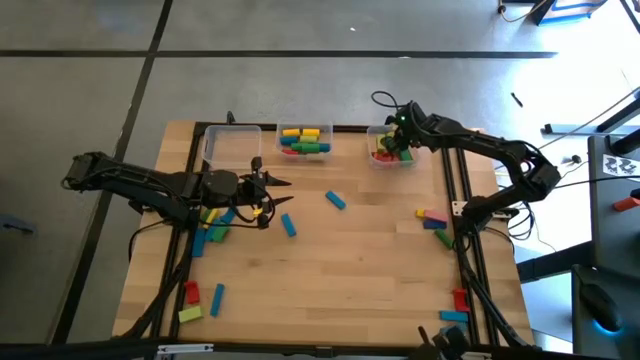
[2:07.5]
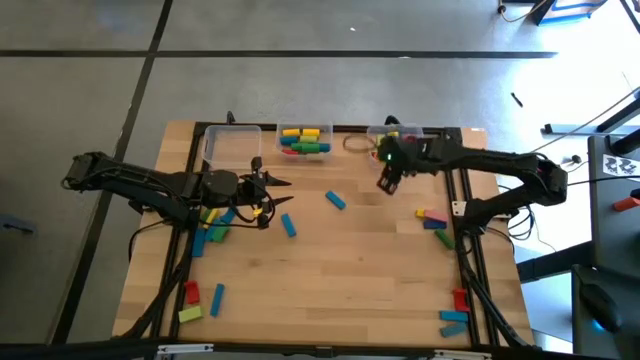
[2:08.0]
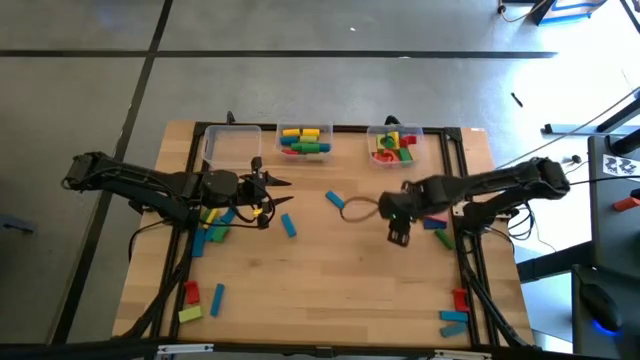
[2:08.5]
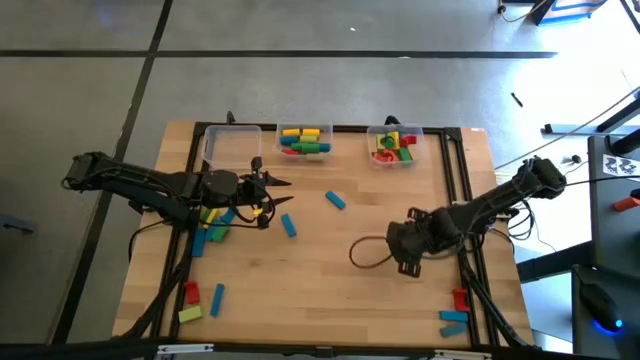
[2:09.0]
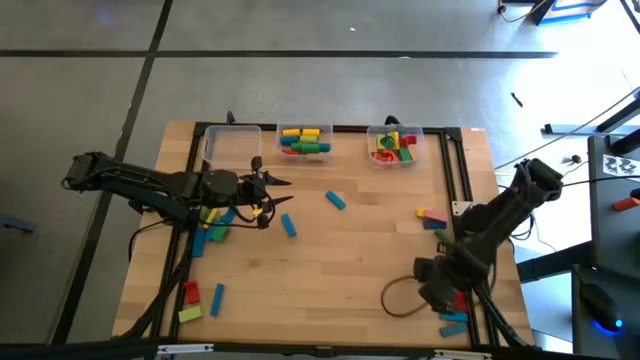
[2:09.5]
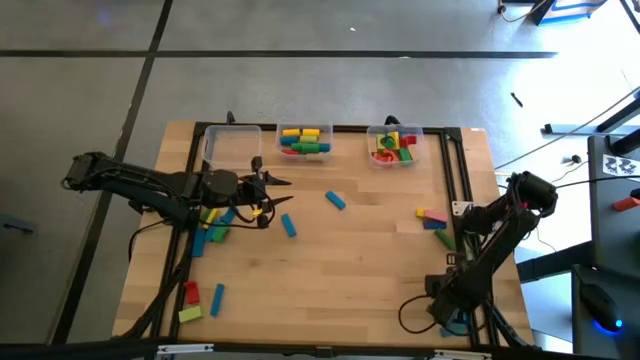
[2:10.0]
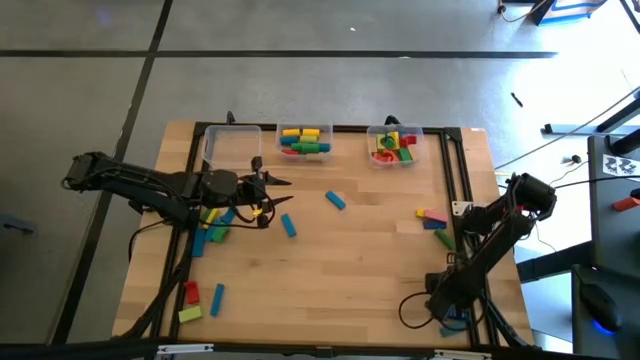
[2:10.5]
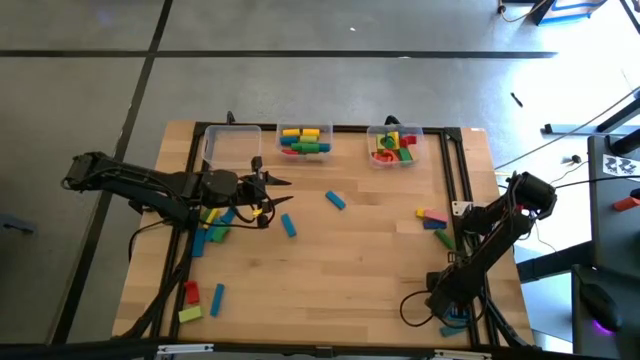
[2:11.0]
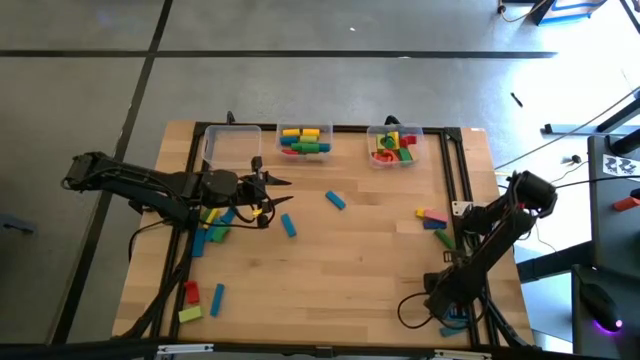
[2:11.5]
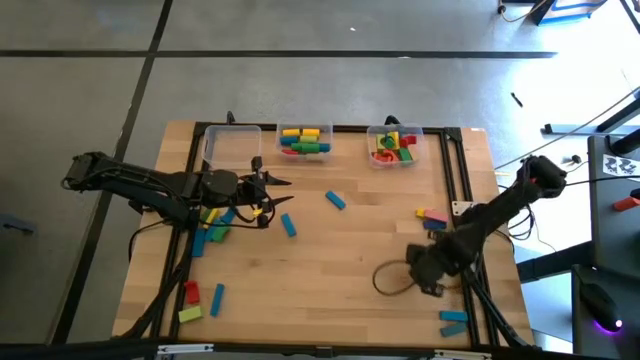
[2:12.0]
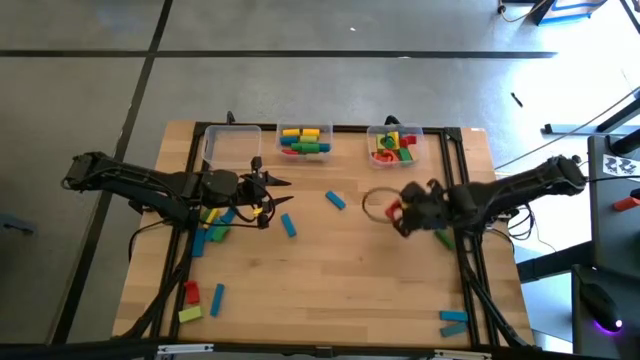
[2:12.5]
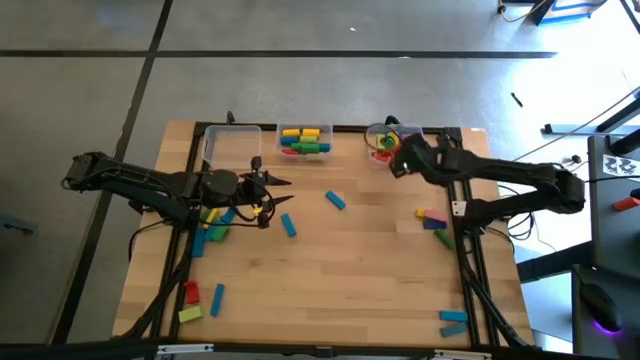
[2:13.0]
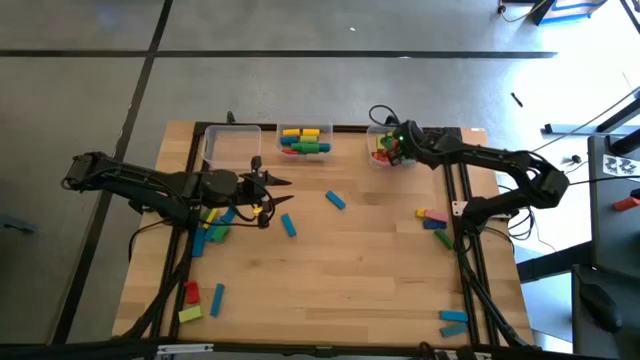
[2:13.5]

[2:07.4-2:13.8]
Task: Sort blocks by size
Put the red arch block into the right transparent bin

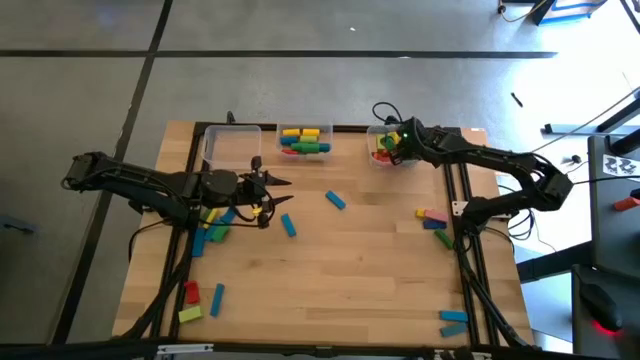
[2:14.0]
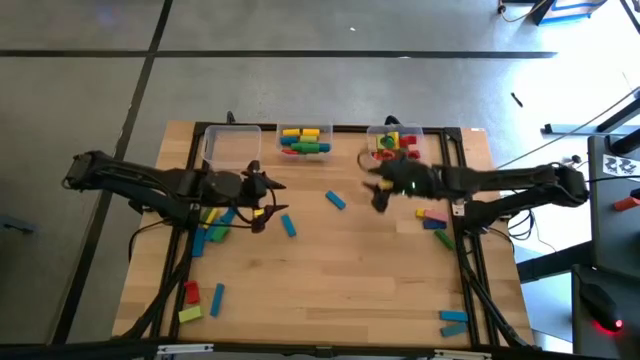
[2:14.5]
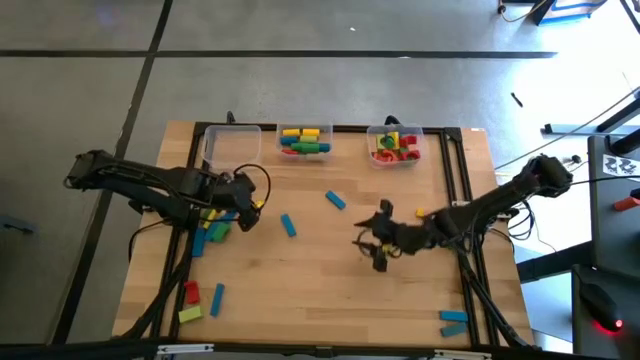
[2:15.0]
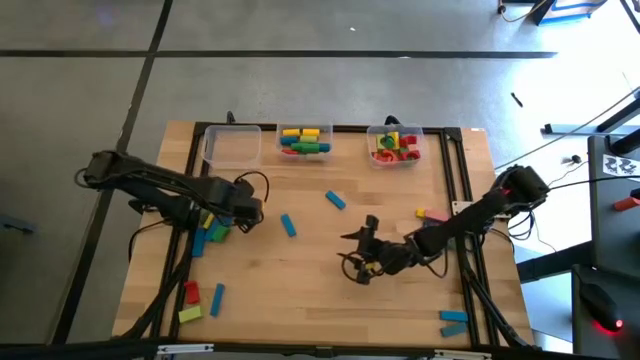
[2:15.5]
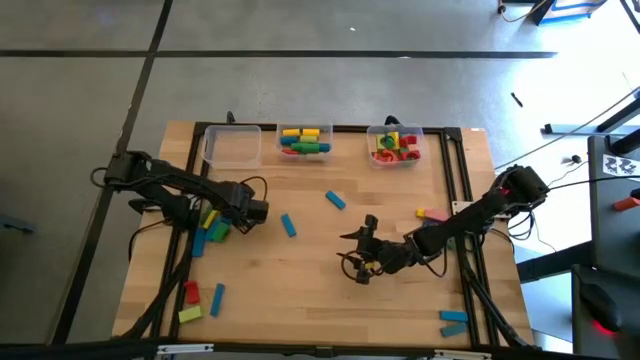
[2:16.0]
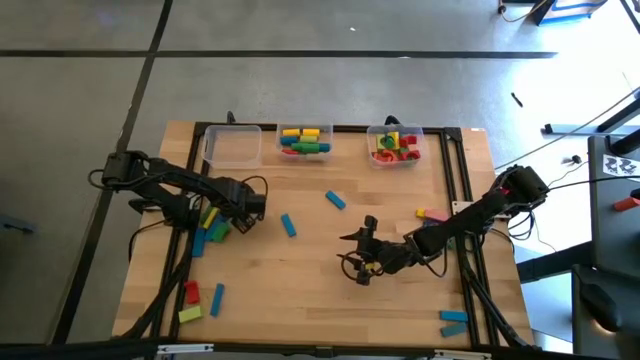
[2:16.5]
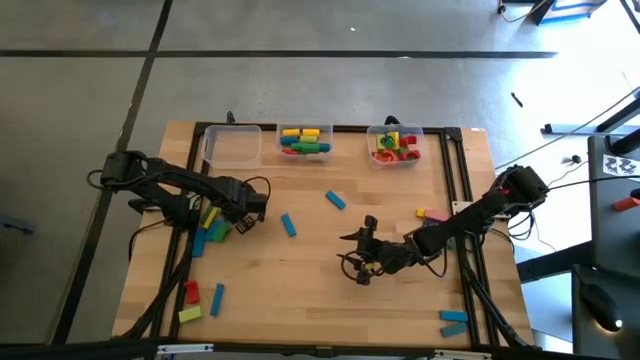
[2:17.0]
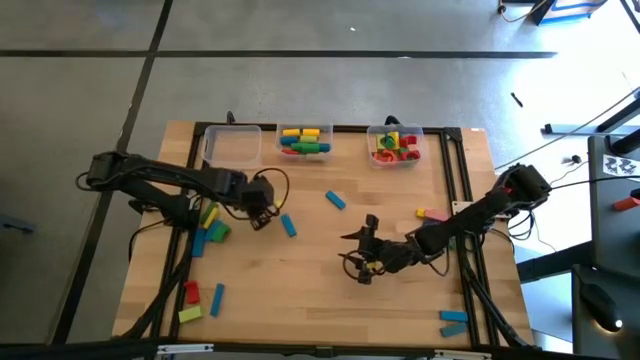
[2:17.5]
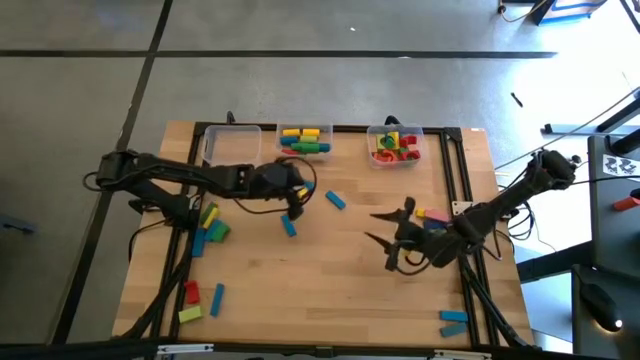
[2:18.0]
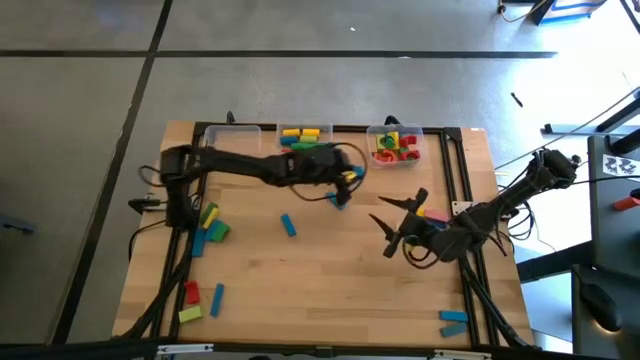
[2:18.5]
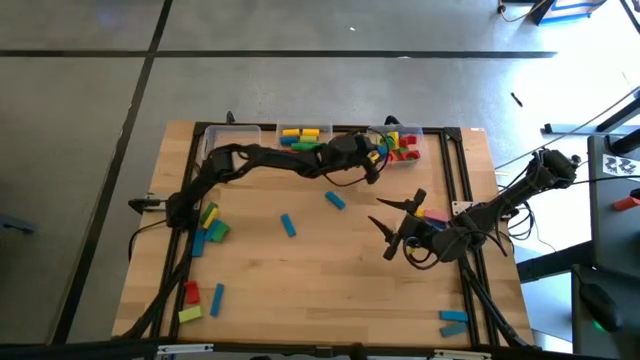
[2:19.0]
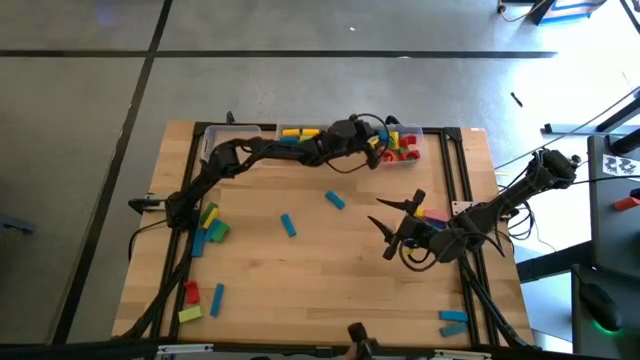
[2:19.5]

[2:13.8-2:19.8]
Put the blue arch block into the right transparent bin

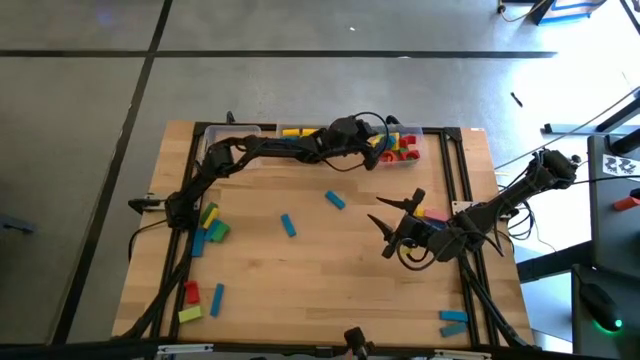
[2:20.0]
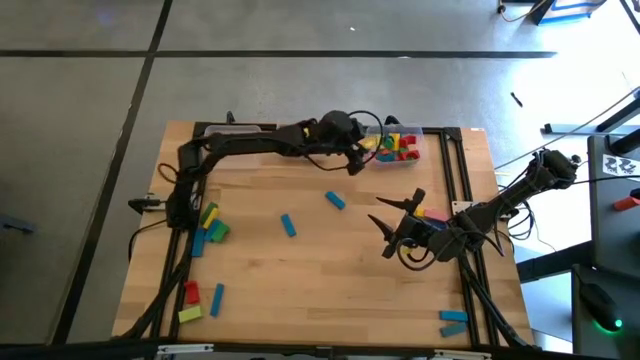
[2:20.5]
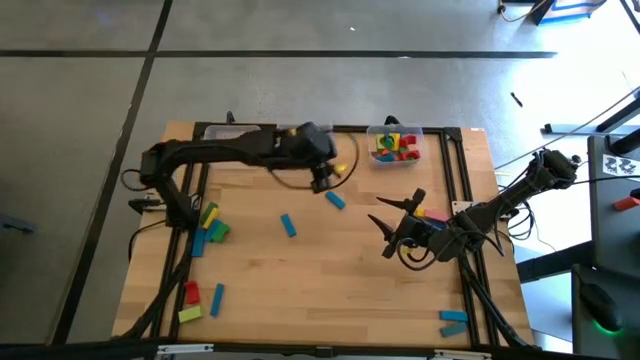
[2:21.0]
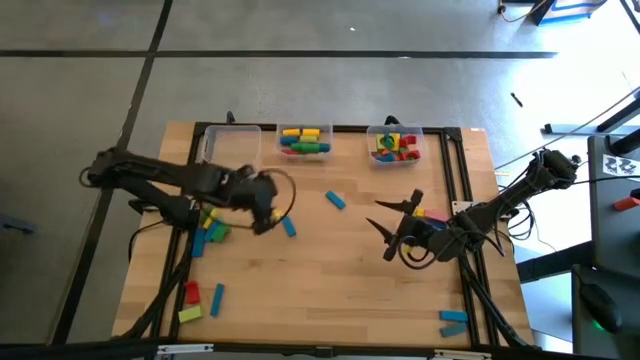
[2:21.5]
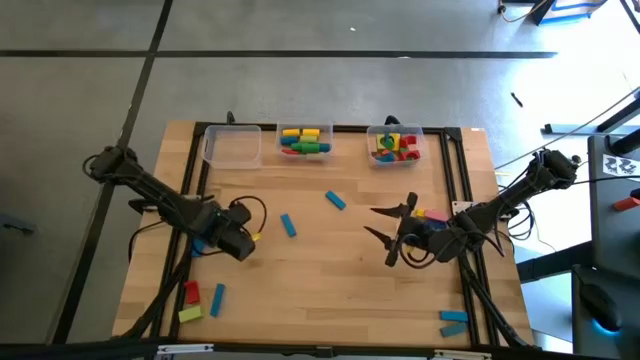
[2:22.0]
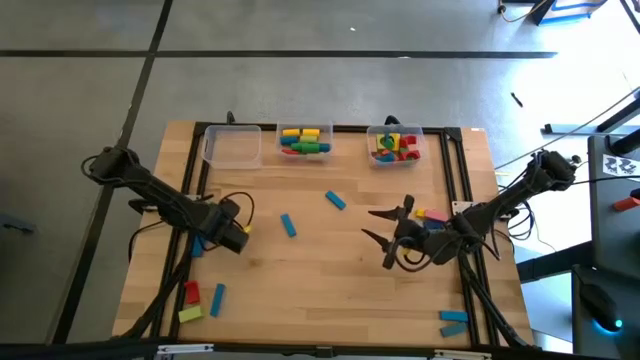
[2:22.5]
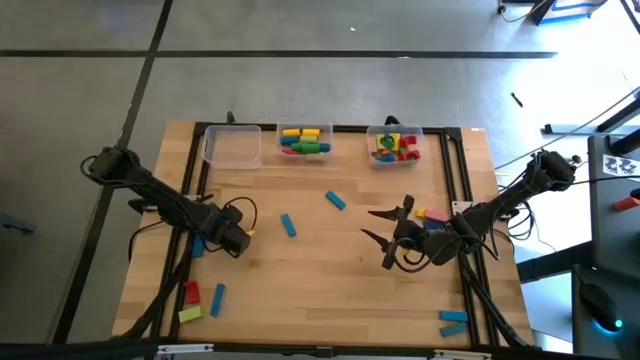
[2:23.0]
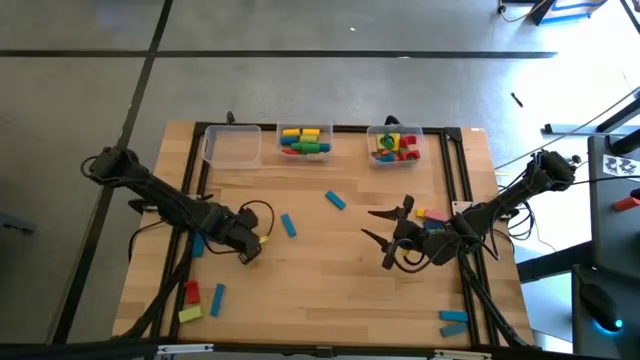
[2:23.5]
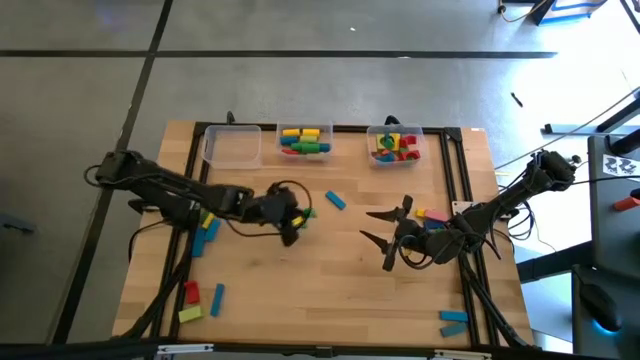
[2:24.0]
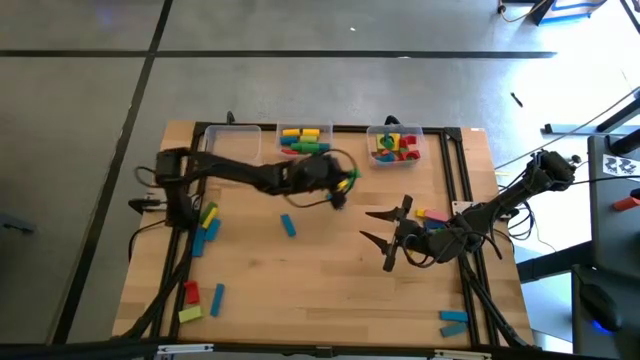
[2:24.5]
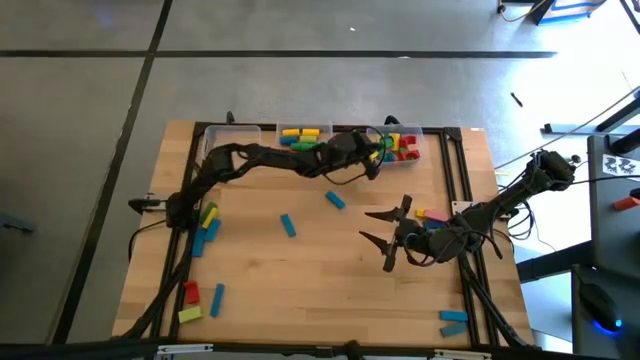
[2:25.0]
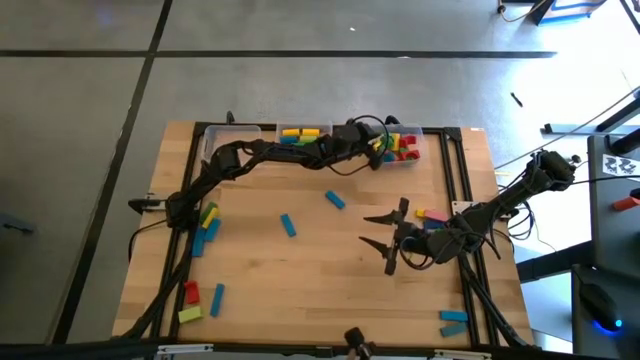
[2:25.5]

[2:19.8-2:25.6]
Put the green arch block into the right transparent bin

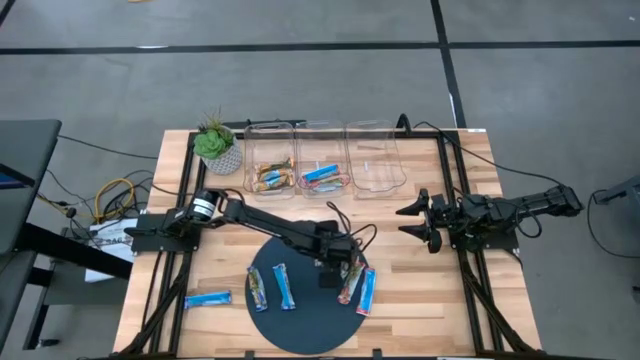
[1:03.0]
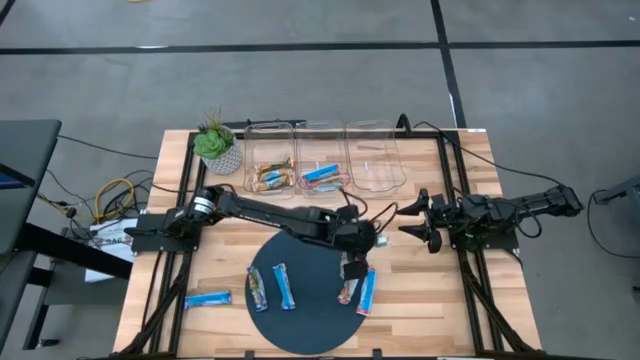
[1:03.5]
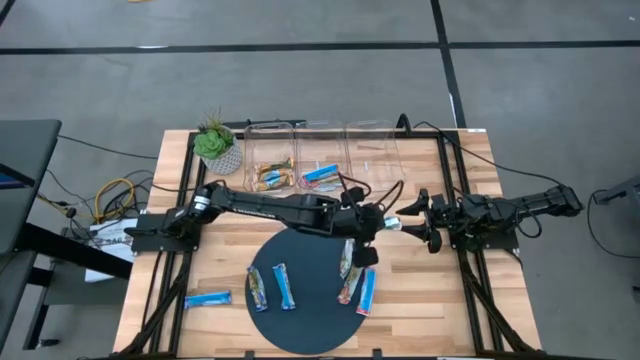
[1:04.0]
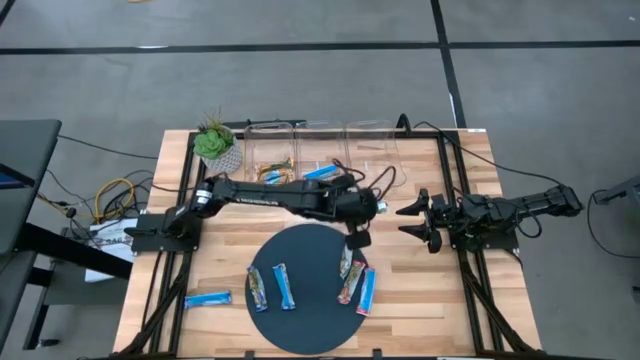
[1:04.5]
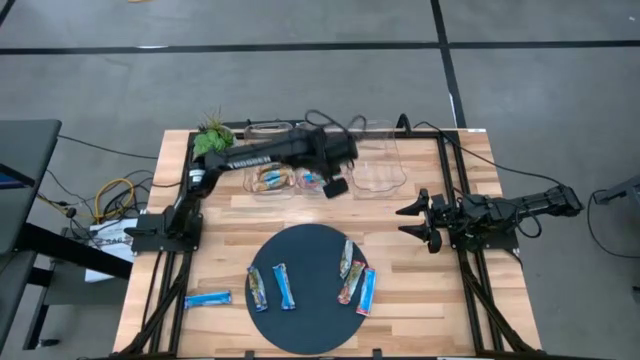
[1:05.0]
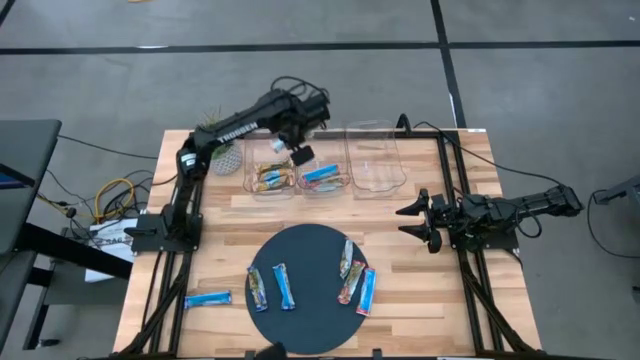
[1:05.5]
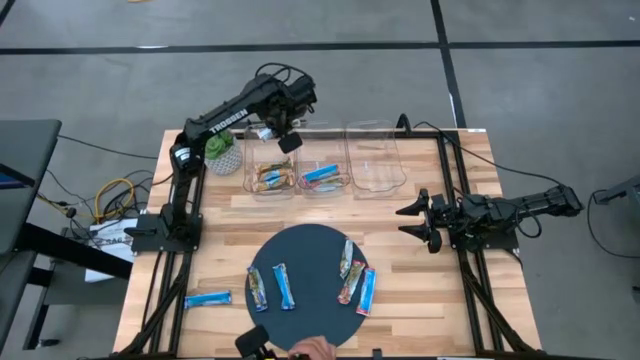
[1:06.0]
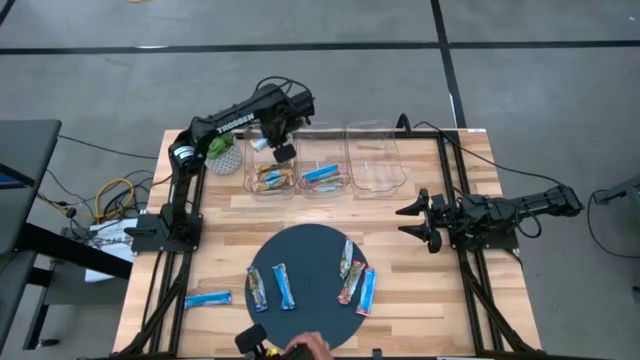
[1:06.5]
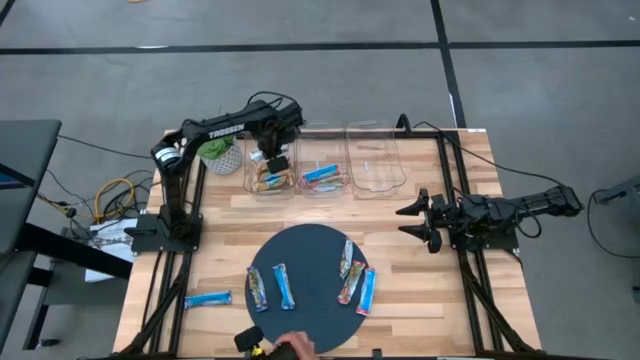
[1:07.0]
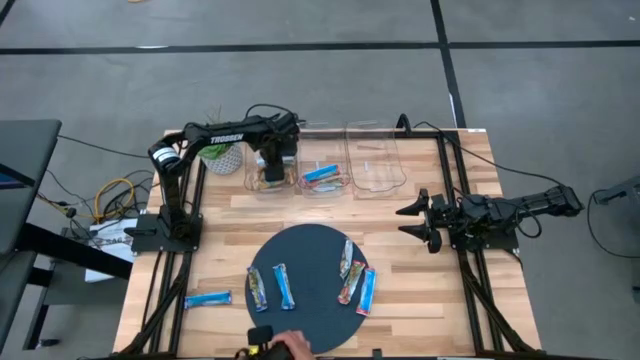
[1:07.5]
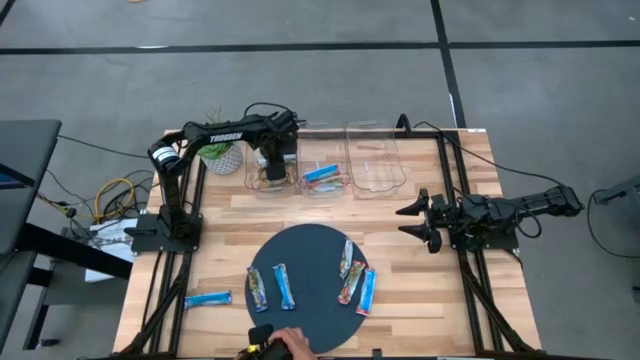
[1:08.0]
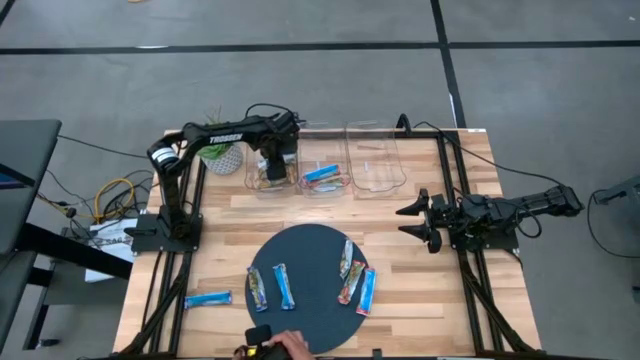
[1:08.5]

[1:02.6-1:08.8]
Task: Pick and place Granola Bars by type
Put the orange bar into the left transparent bin
